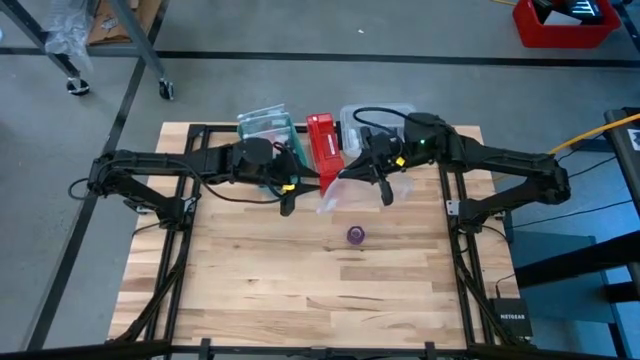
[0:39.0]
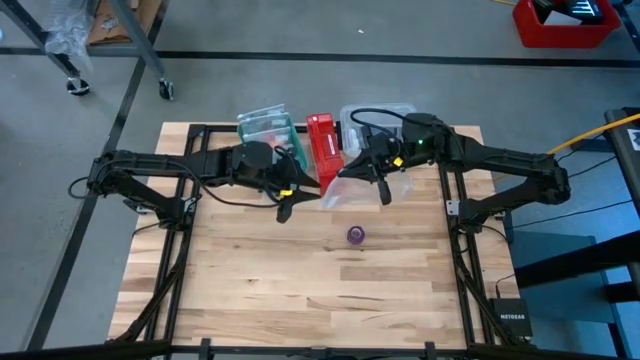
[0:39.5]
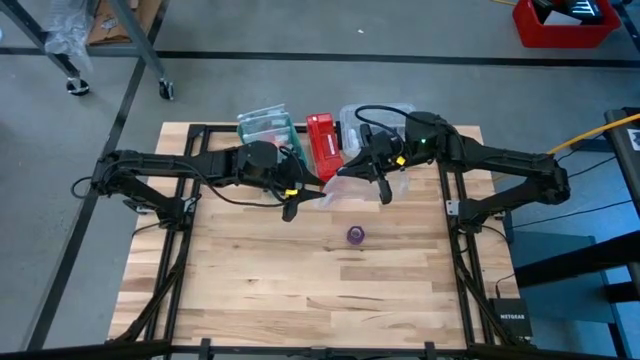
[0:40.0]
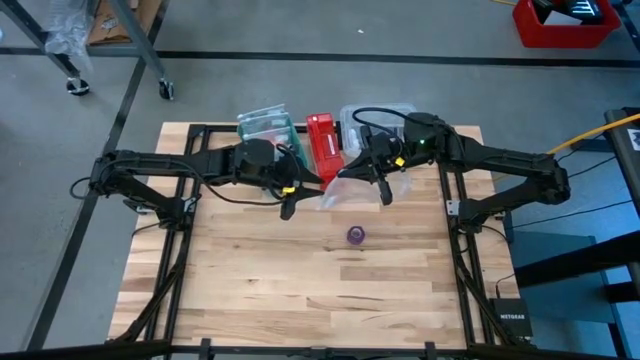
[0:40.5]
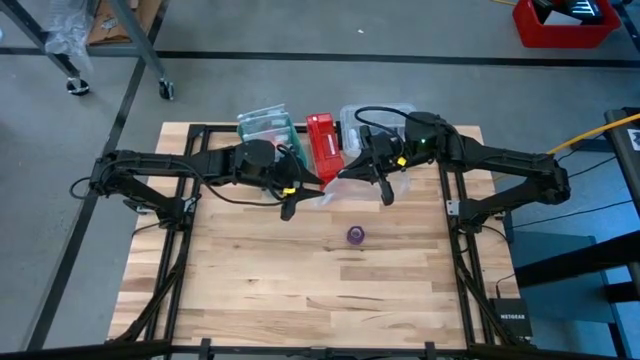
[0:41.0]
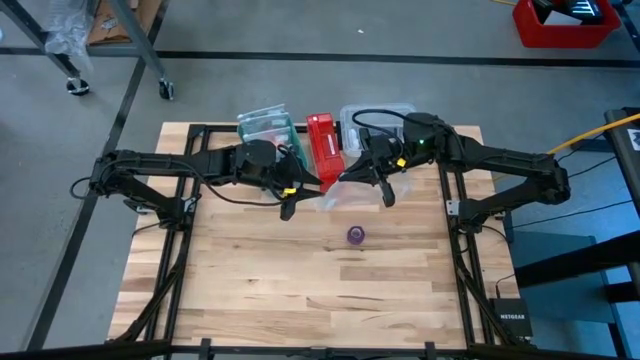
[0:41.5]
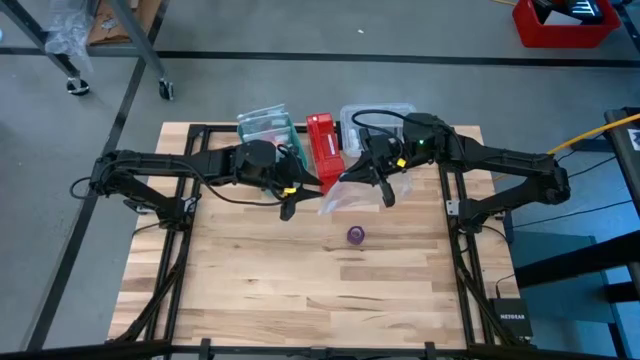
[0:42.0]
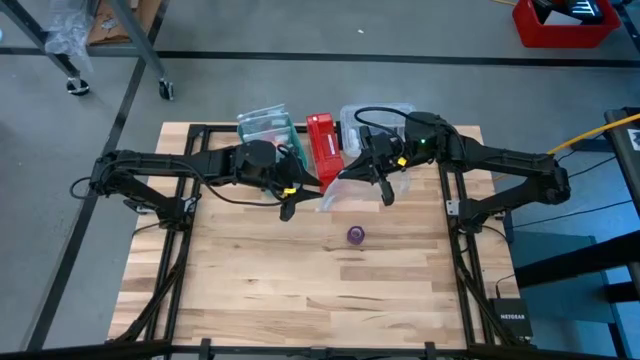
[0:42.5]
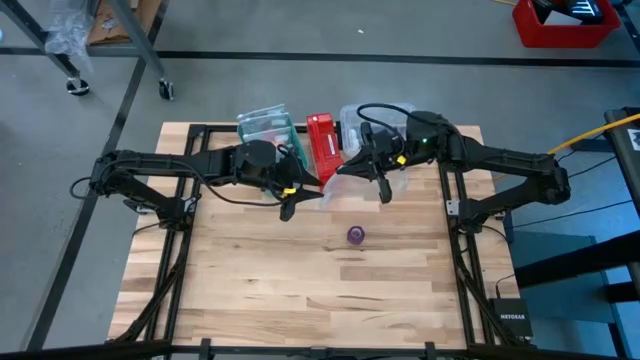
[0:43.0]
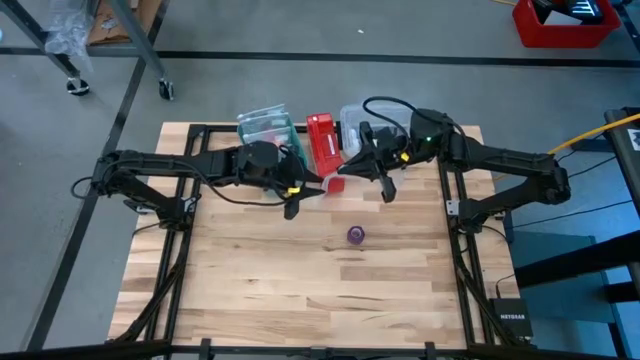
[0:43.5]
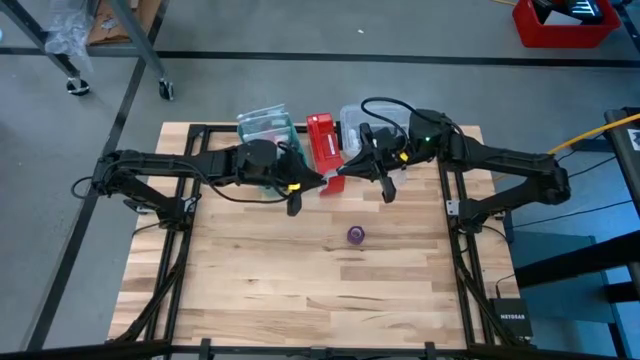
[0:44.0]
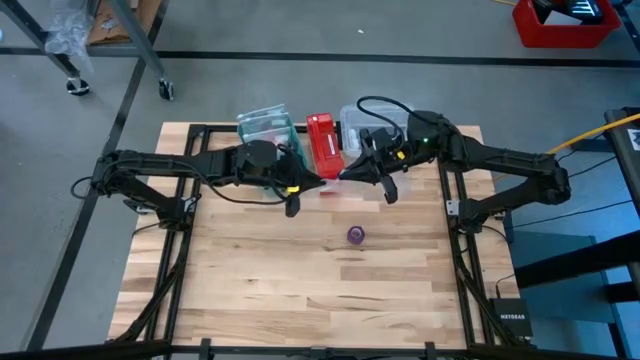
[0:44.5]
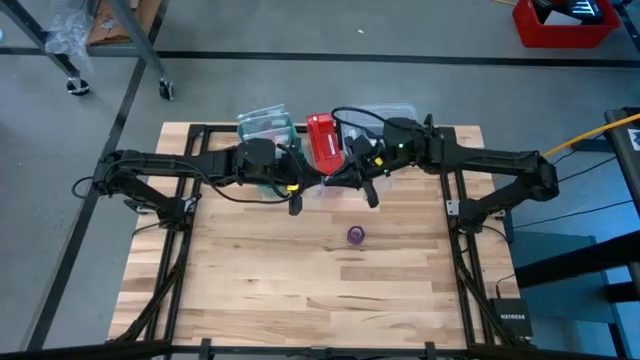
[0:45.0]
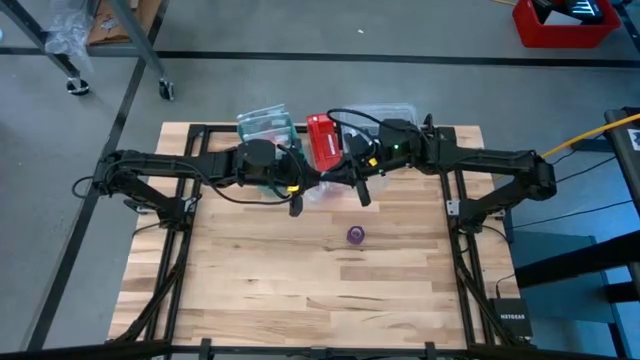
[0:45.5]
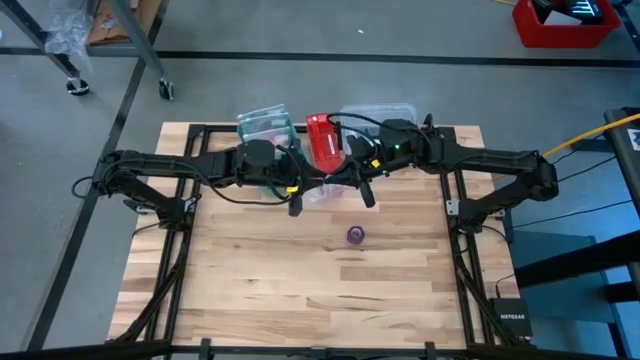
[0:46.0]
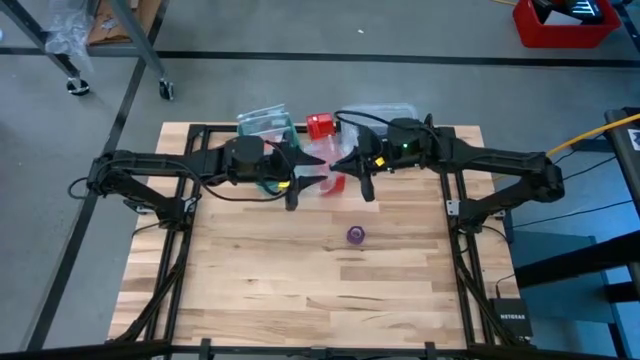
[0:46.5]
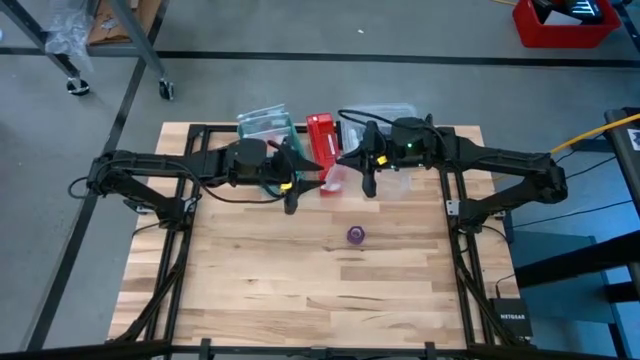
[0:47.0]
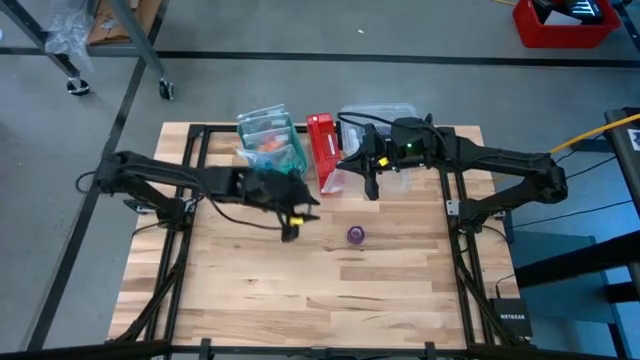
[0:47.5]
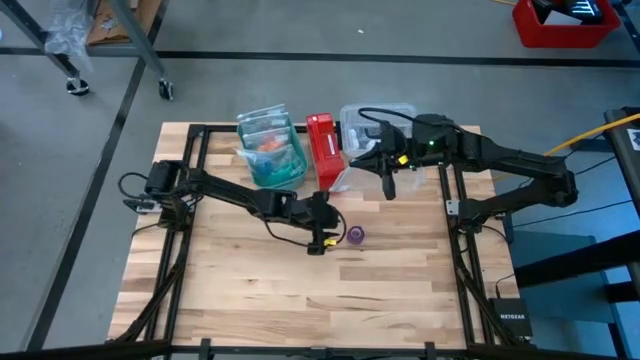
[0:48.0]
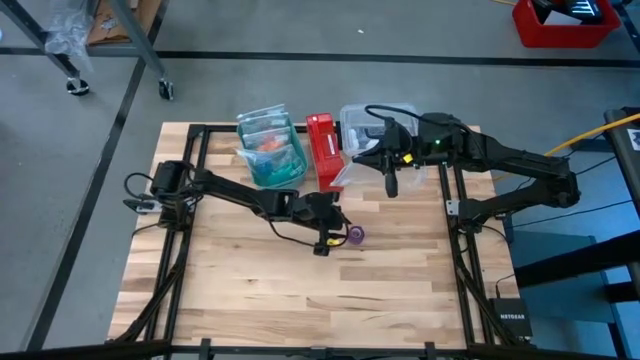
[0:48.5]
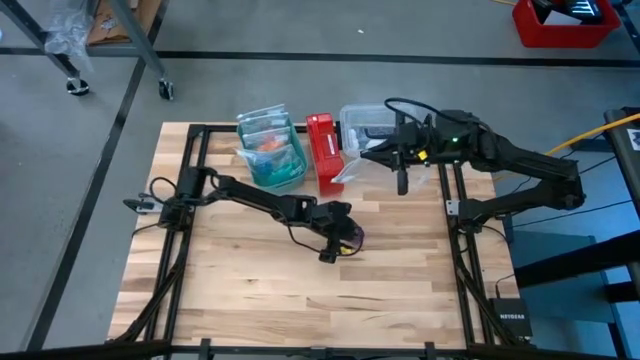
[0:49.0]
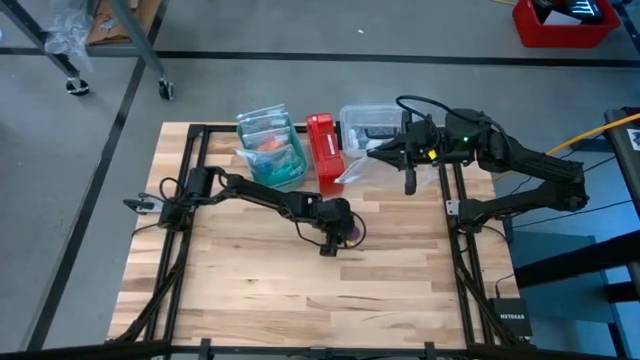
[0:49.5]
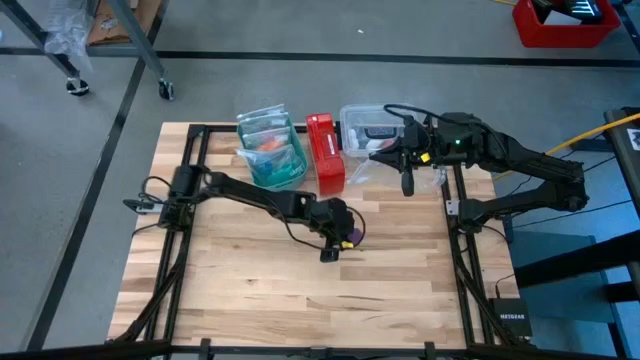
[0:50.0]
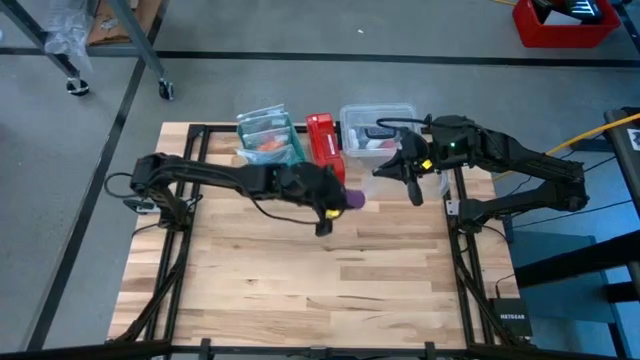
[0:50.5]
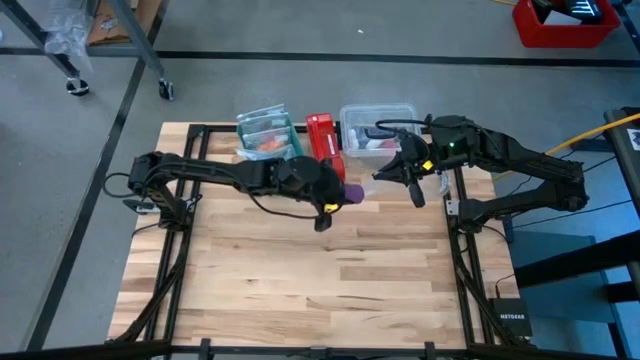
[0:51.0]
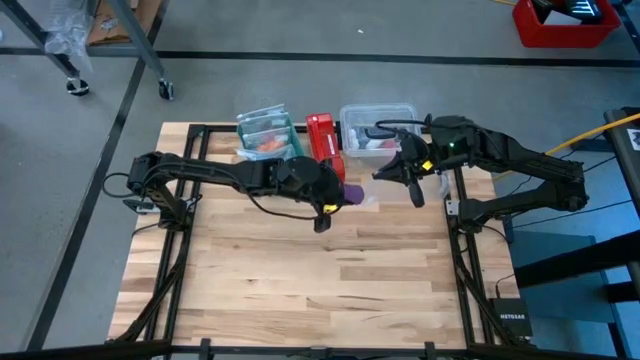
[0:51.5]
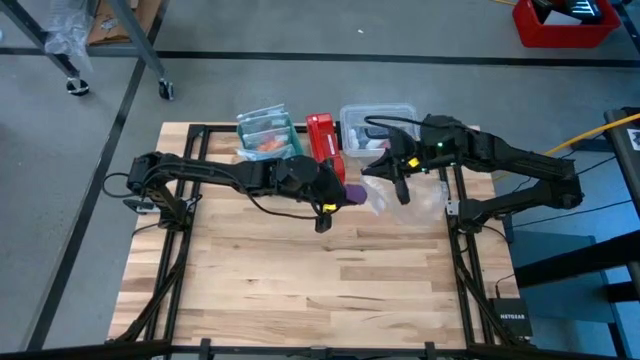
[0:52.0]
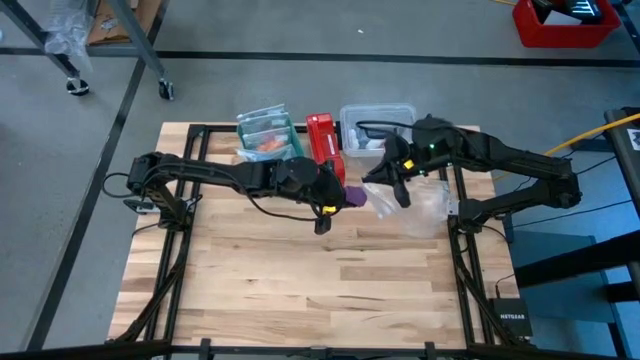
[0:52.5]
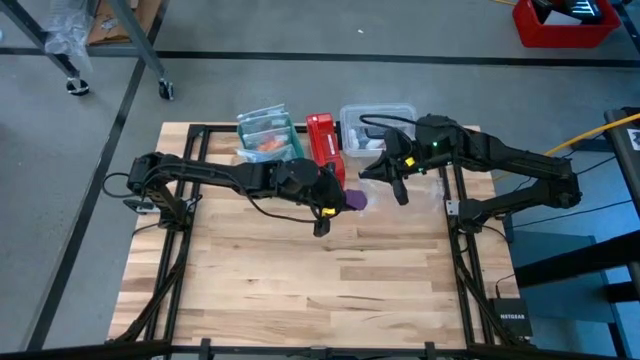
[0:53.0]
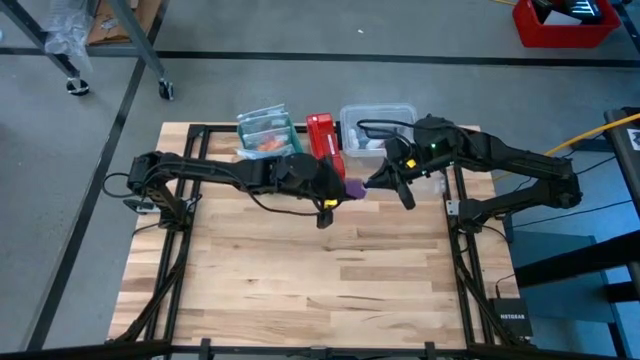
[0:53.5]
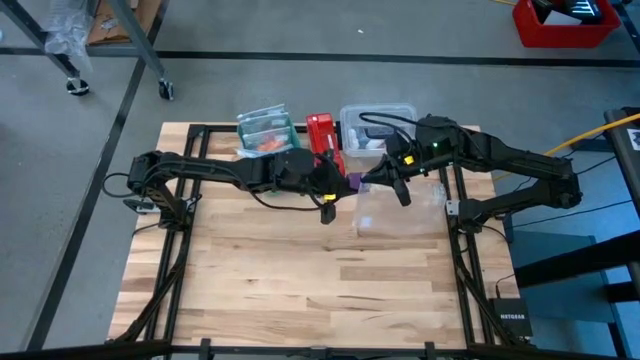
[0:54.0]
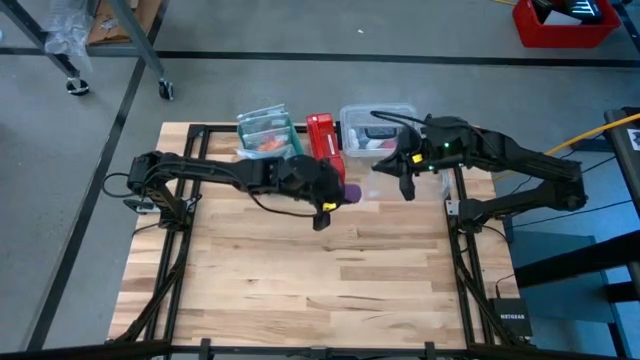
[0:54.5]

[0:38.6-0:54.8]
Task: Roll bandage
Put the purple bandage into the transparent zip bag

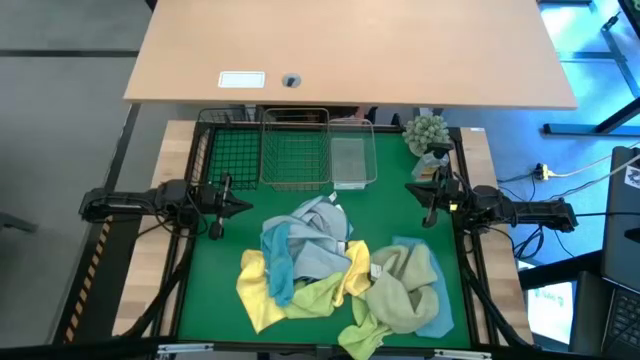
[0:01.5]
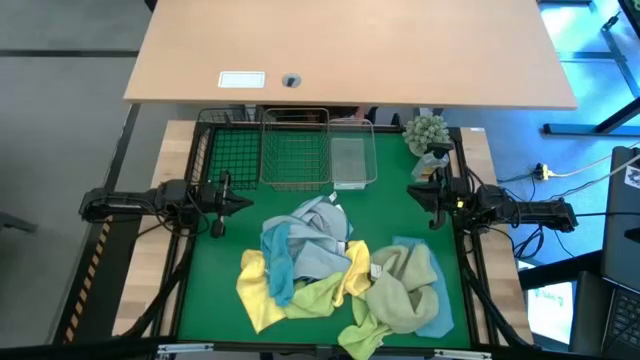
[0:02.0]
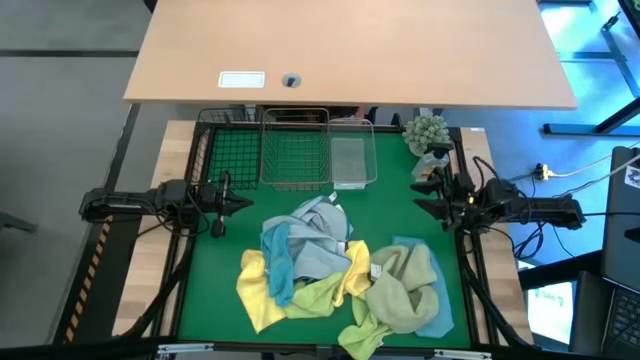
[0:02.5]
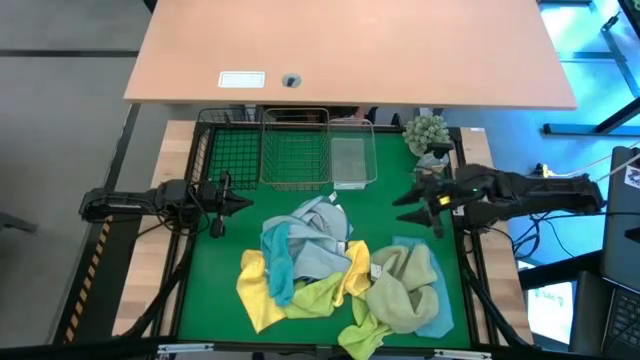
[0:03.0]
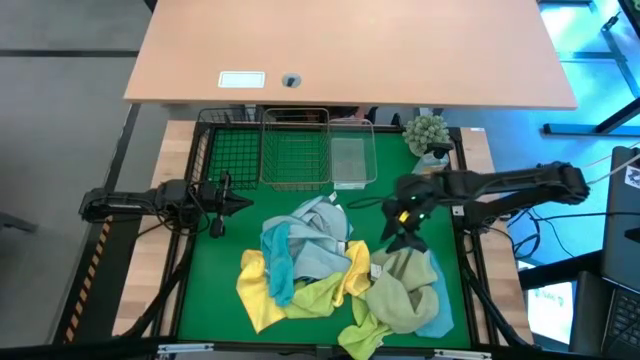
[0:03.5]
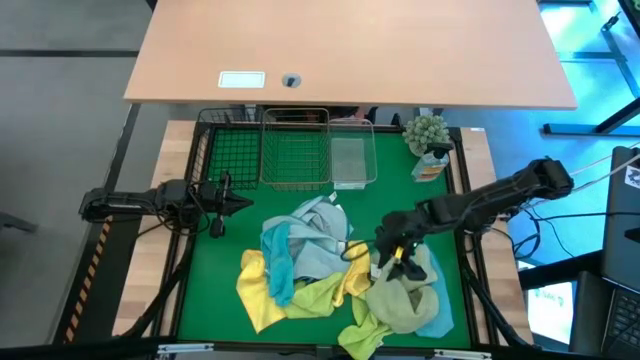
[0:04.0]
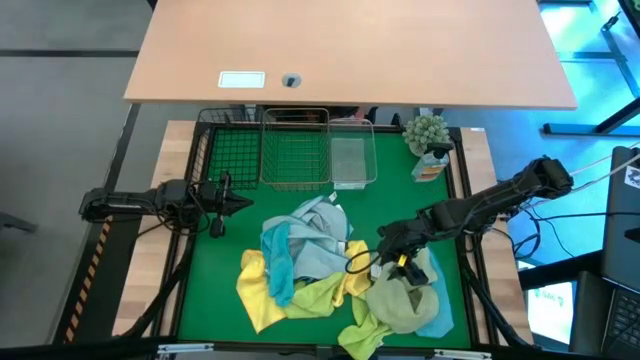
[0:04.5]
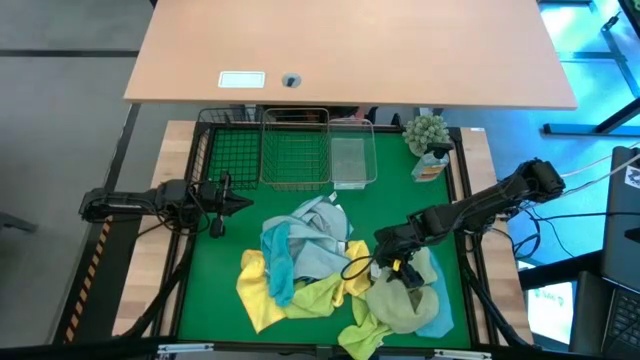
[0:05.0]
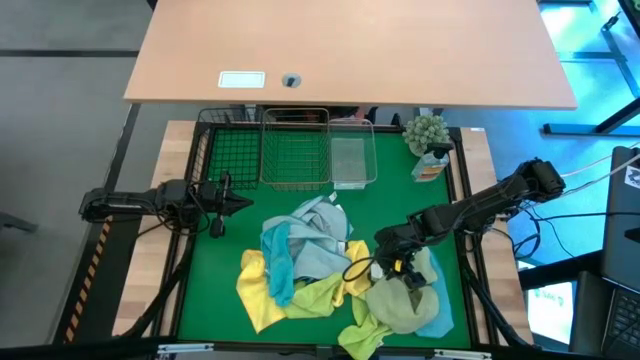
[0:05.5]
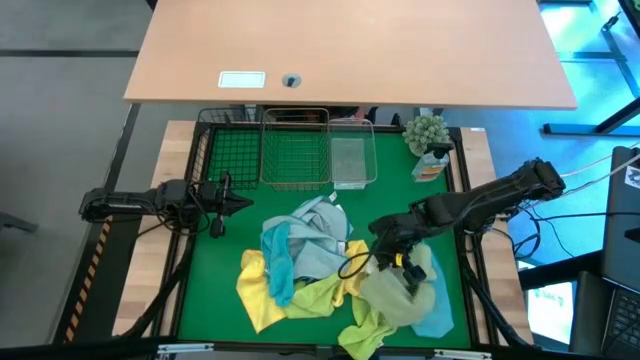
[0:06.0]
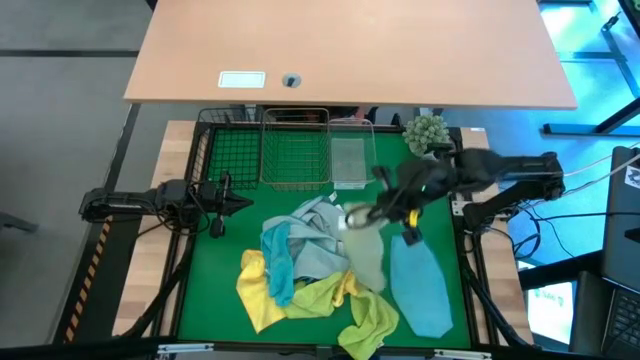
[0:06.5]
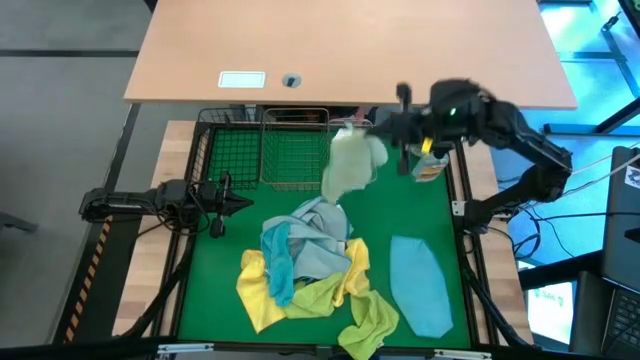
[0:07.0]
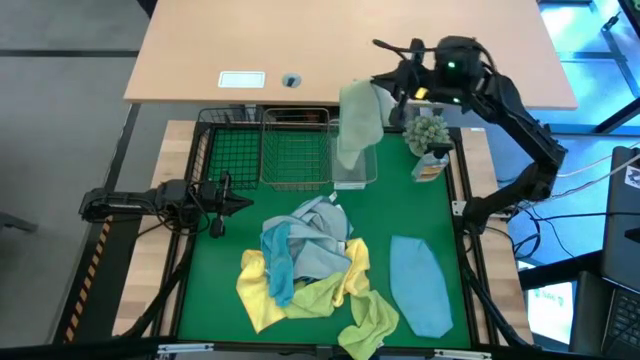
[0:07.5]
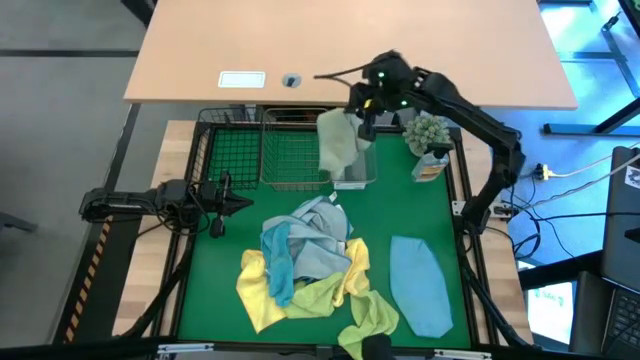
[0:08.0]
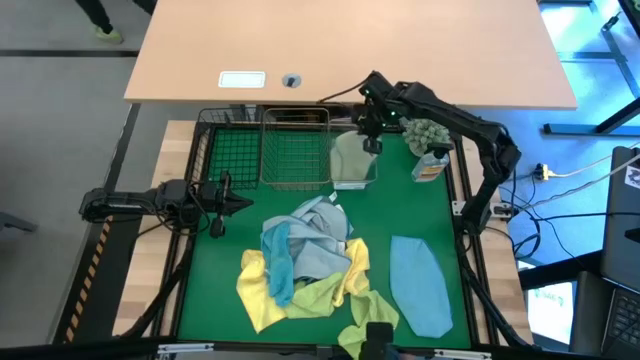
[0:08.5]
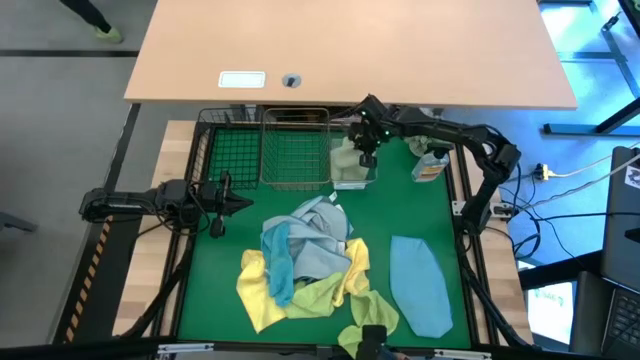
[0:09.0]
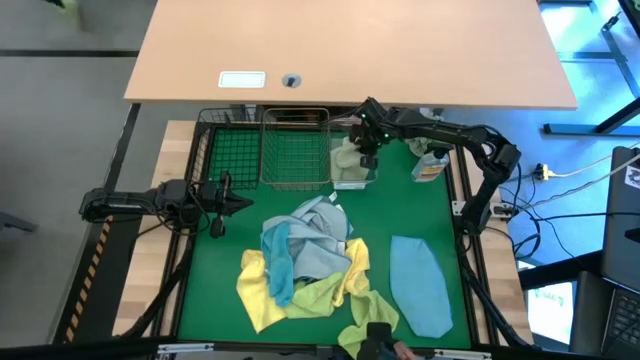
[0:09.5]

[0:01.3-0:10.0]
Task: Sort microfiber towel by color & place in baskets
Put the light green microfiber cloth into the transparent bin
